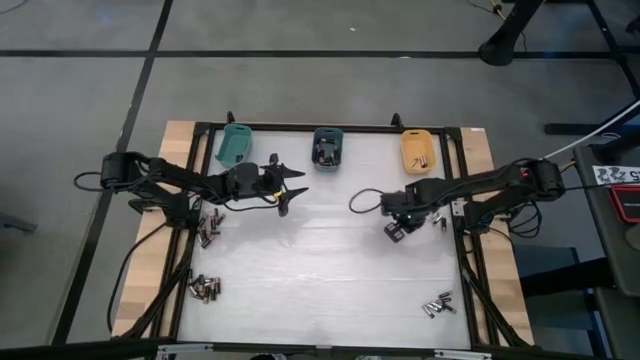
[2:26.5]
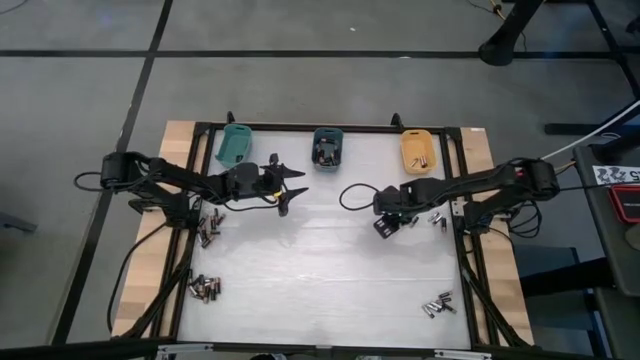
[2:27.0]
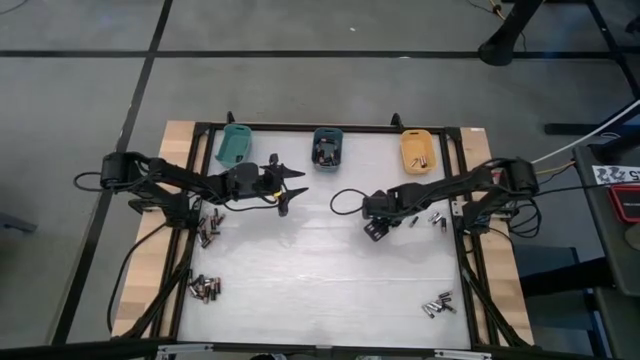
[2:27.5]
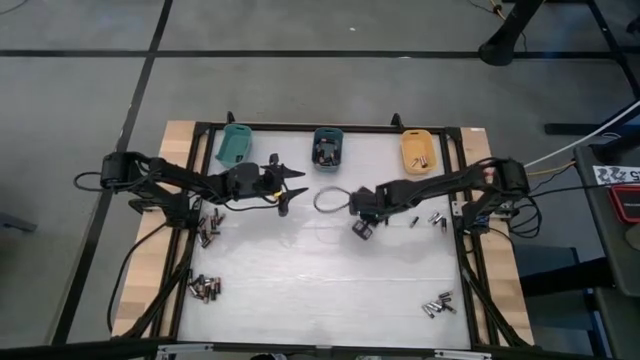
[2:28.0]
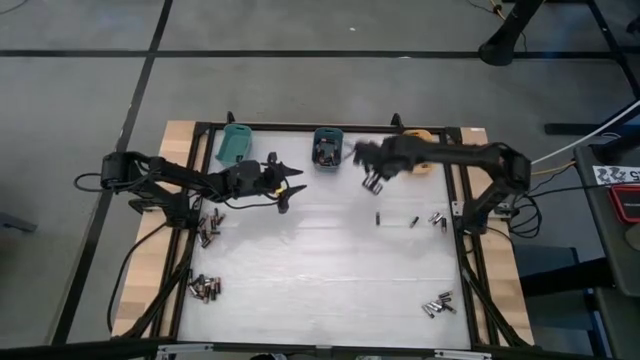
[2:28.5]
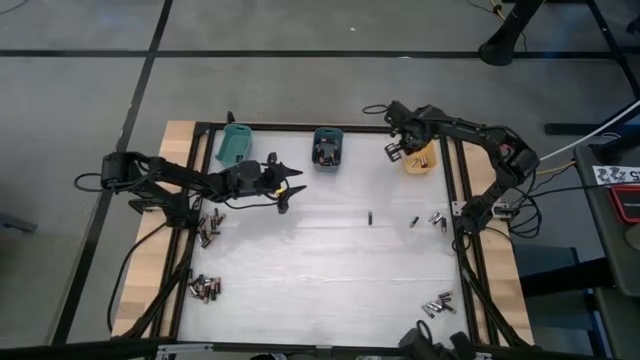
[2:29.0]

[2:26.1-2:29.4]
Task: Sort batteries
Put the silver battery into the yellow bin

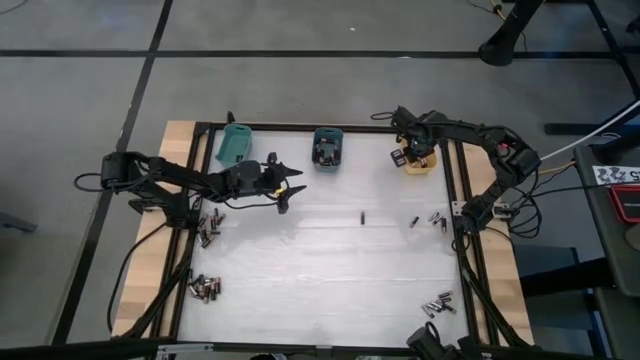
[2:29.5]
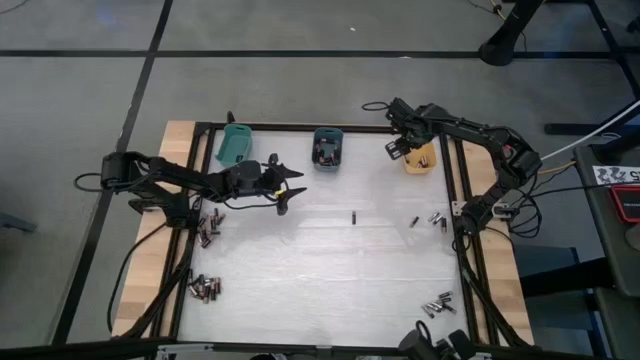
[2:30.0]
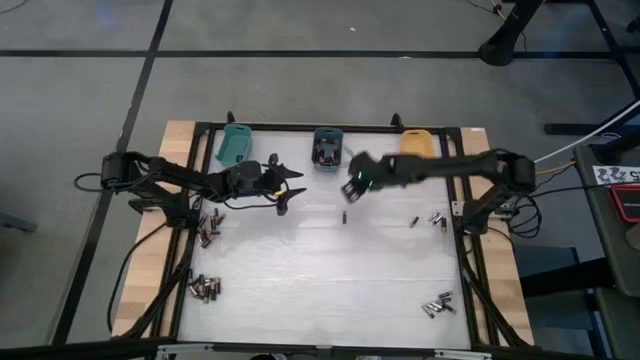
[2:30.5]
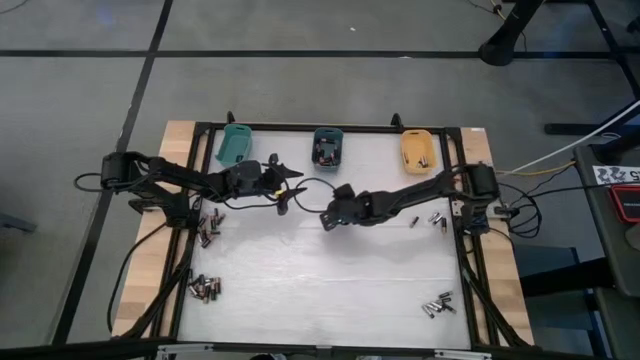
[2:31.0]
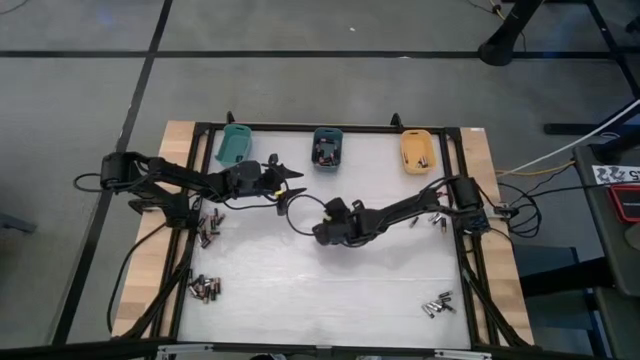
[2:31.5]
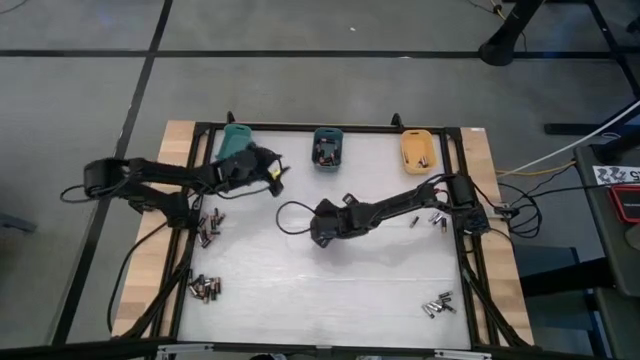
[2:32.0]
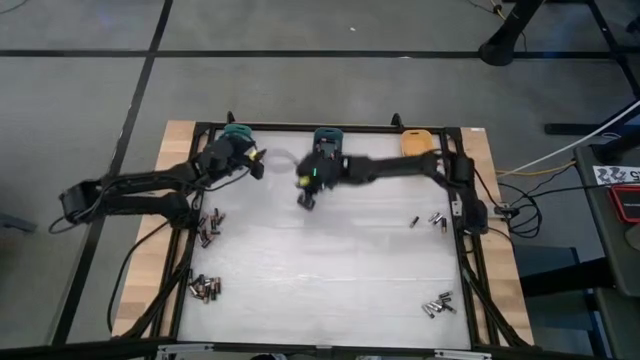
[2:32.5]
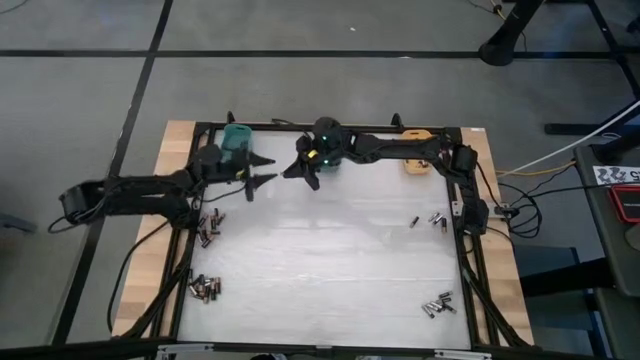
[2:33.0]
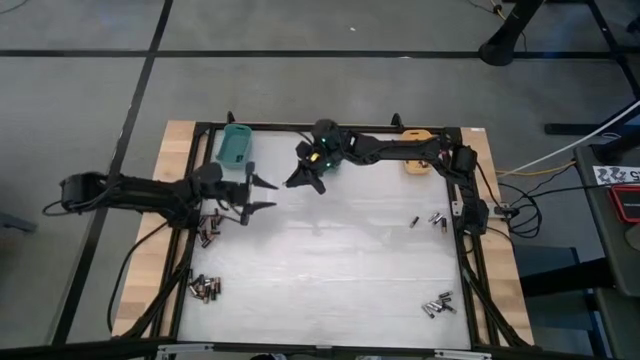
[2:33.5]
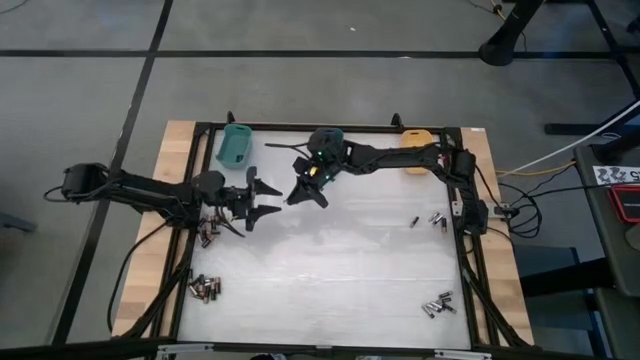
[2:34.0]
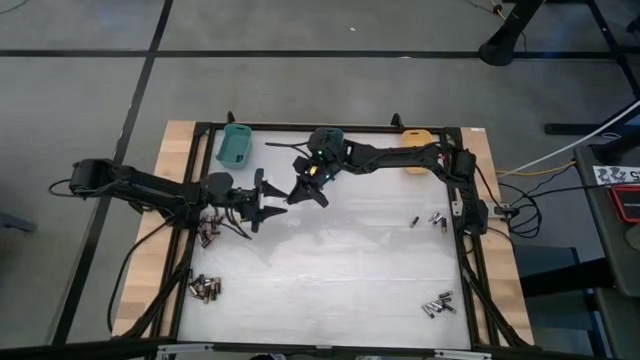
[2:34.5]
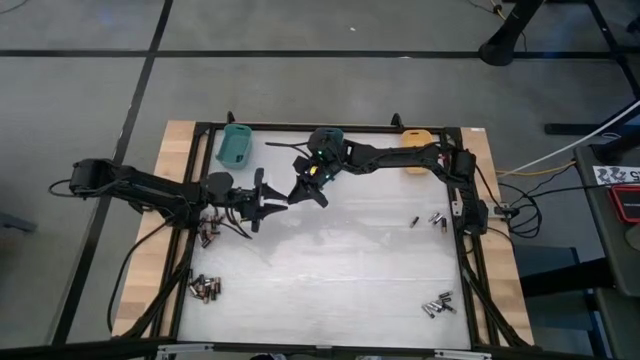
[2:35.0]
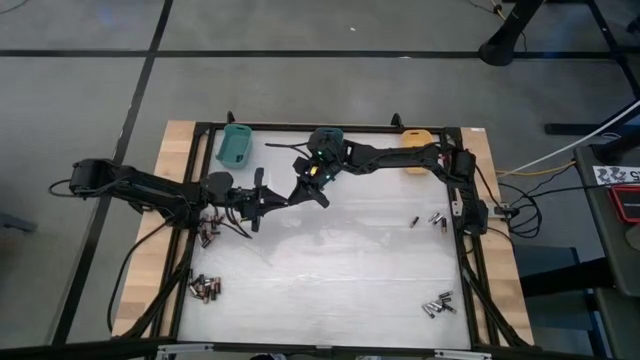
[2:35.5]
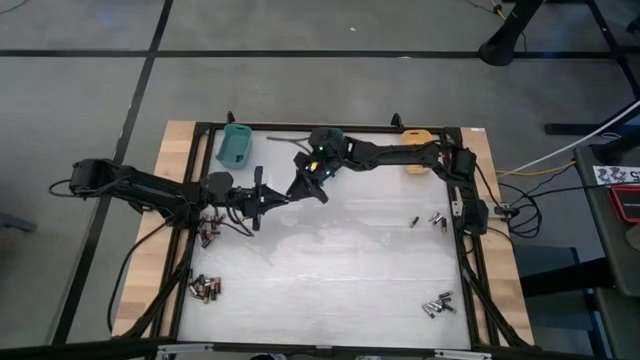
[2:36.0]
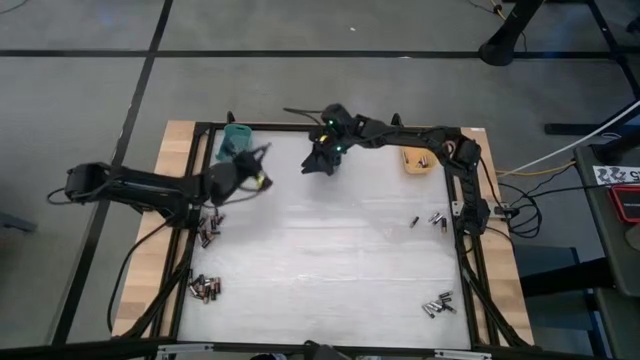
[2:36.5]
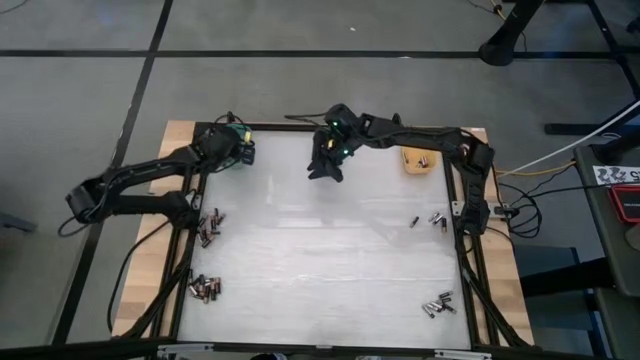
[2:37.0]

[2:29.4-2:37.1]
Put the brown battery into the green bin

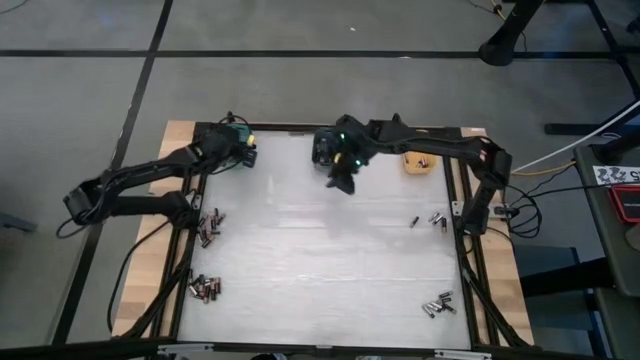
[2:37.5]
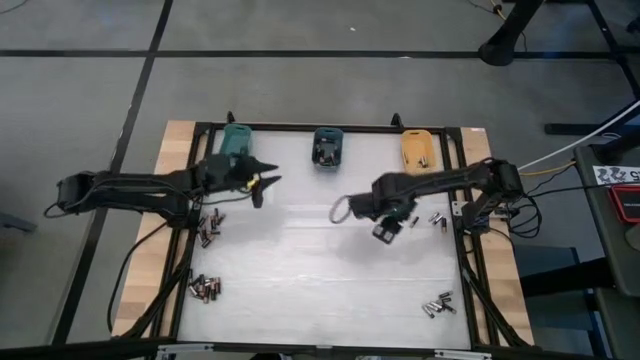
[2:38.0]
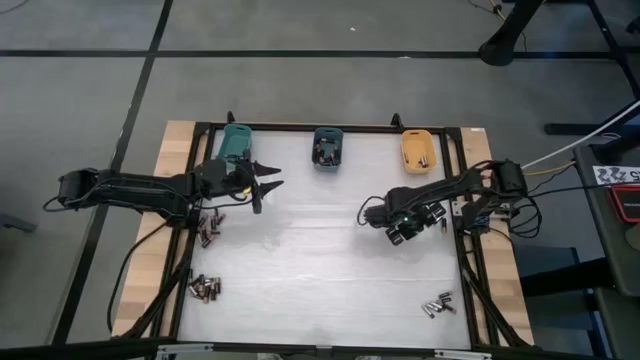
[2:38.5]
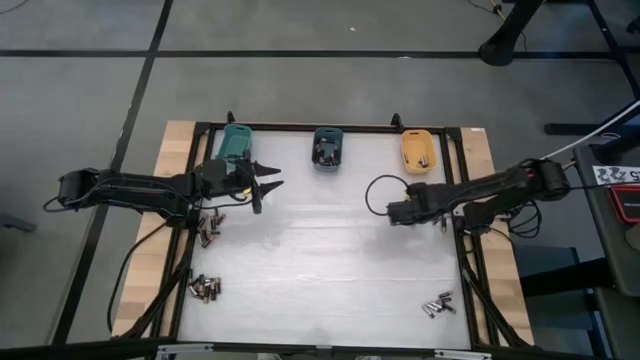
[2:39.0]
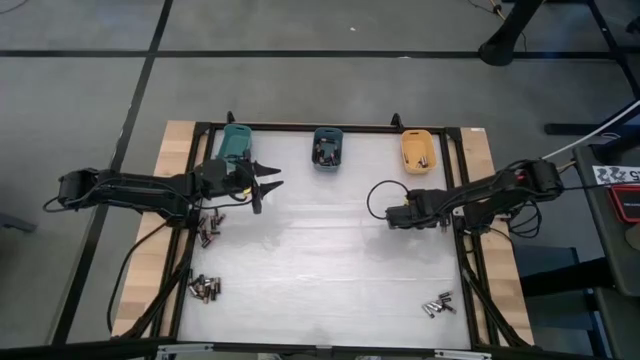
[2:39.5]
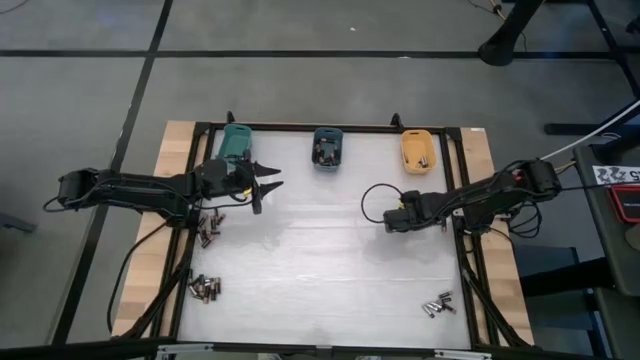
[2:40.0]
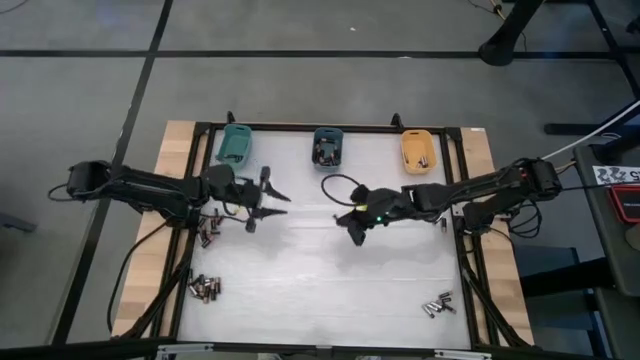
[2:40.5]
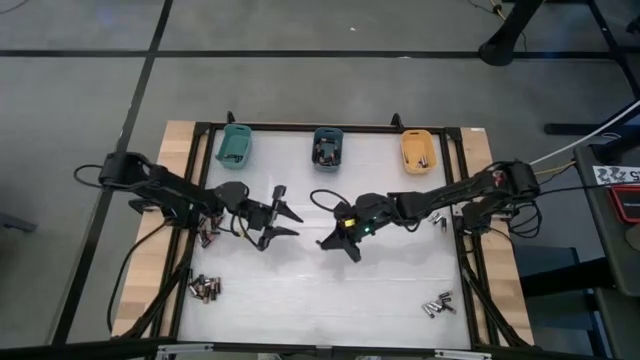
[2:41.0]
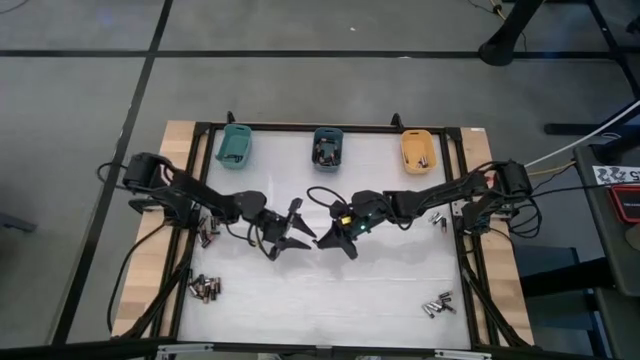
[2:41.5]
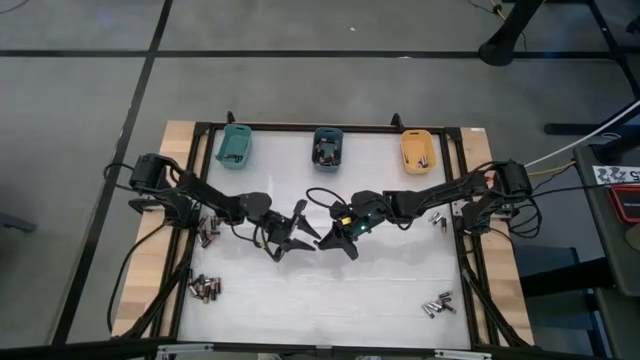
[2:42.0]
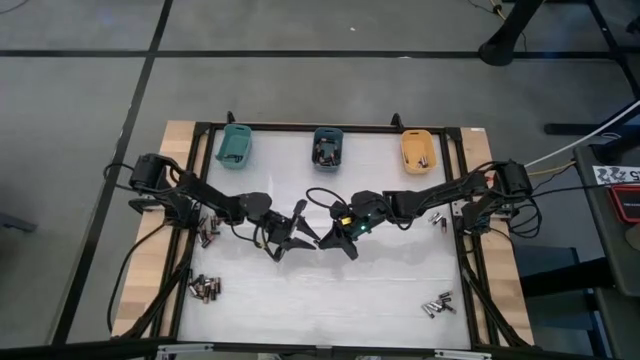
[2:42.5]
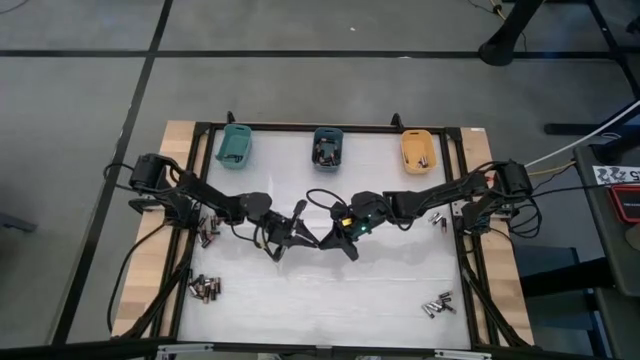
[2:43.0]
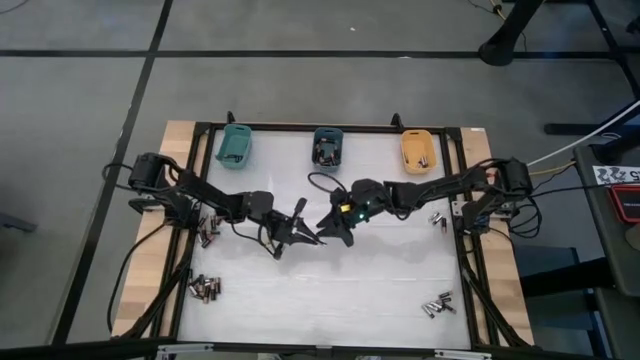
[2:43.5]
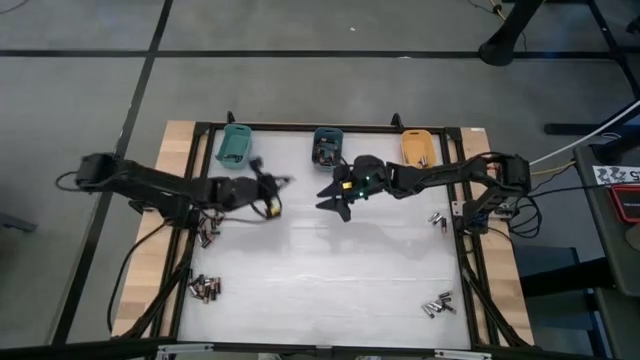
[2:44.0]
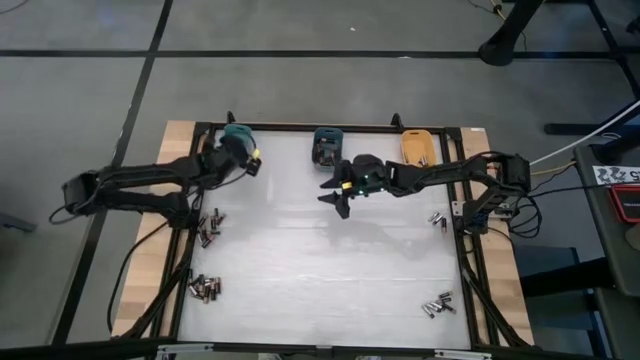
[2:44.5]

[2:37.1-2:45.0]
Put the brown battery into the dark green bin

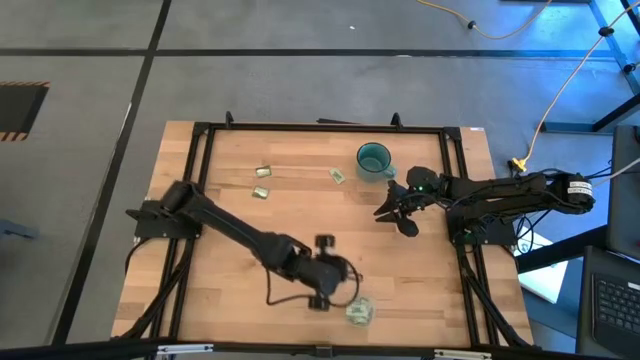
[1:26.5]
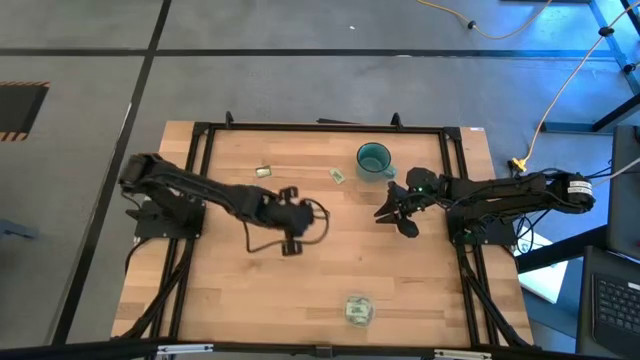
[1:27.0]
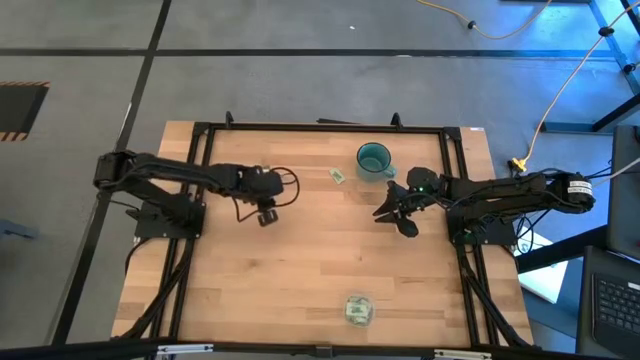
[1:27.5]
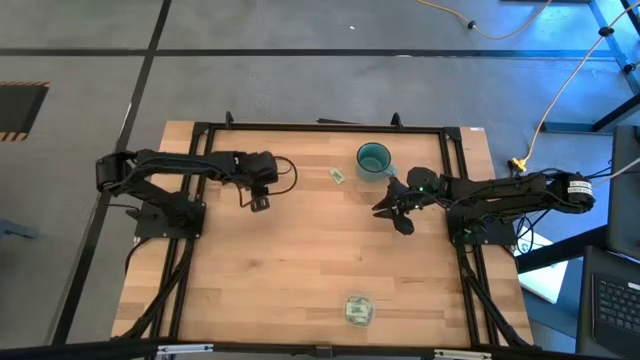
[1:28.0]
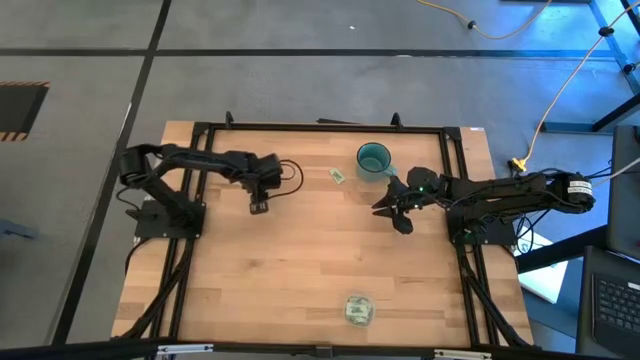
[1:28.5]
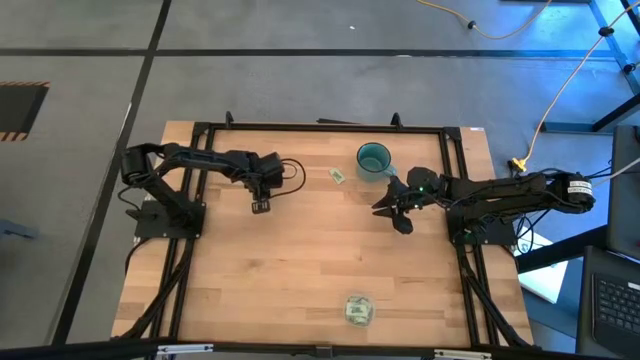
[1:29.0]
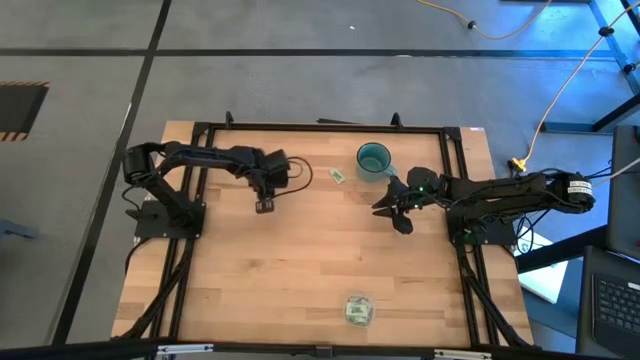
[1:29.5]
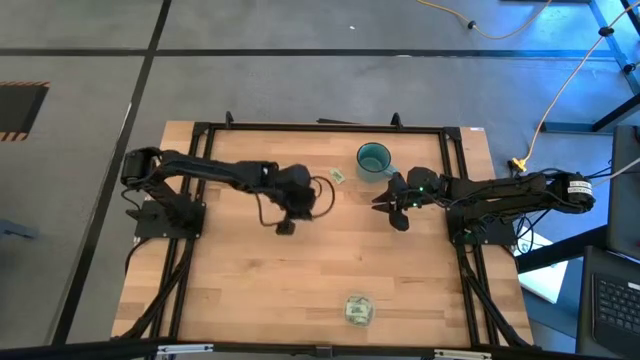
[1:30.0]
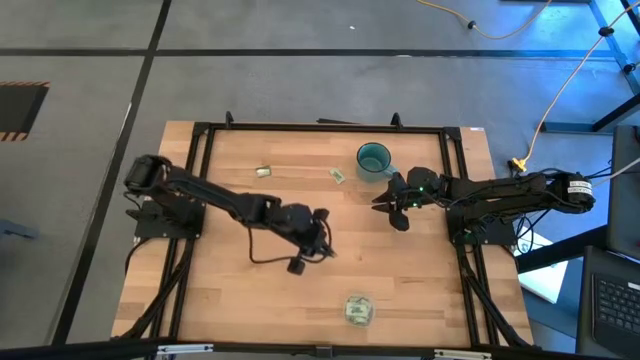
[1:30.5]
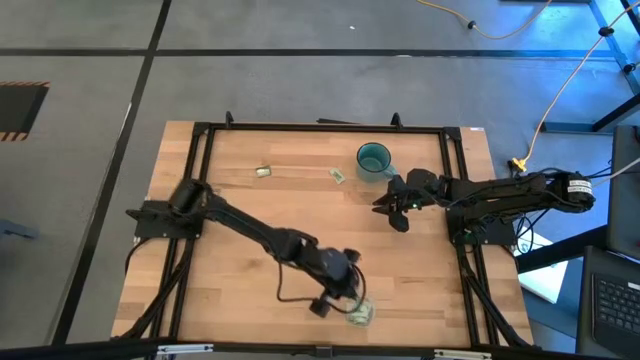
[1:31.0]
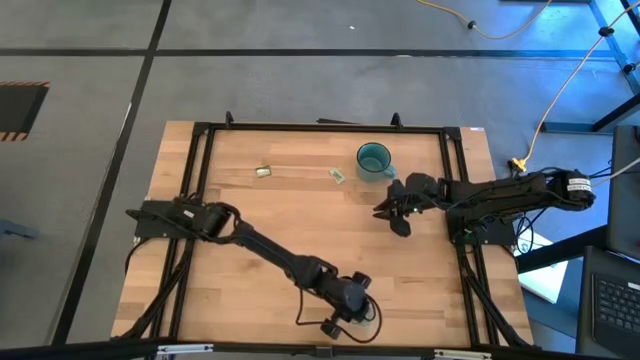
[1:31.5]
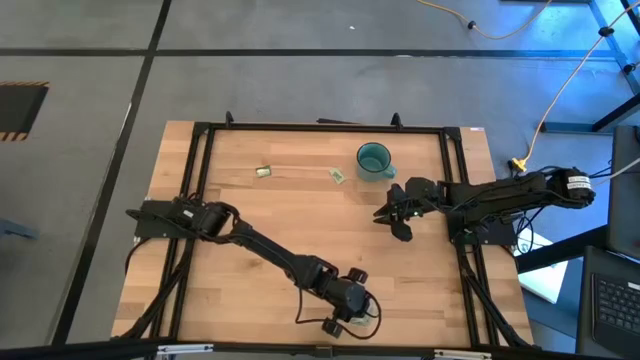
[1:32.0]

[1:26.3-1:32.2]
Task: Pick and place items into bin
Put the green truvia packet into the transparent bin
